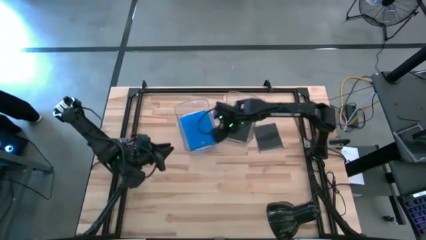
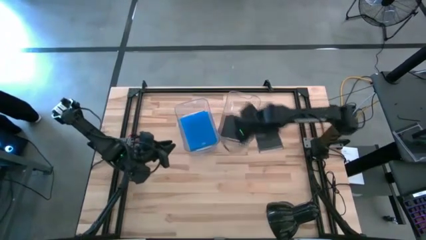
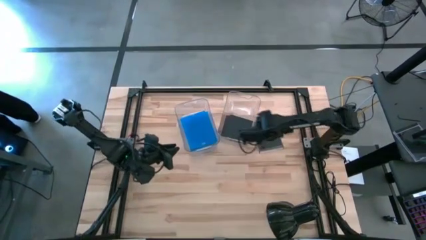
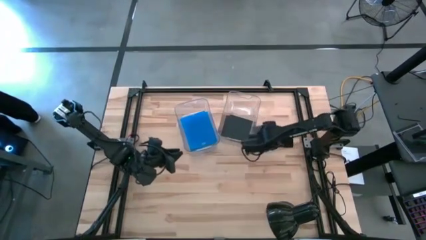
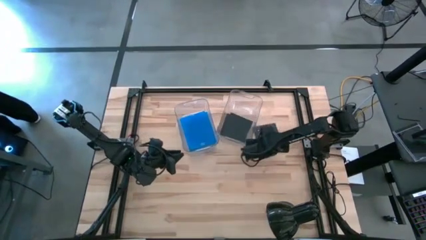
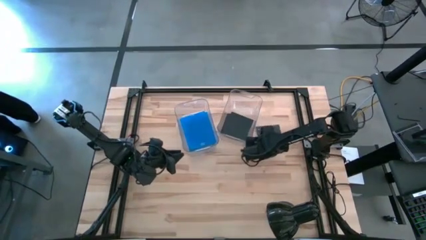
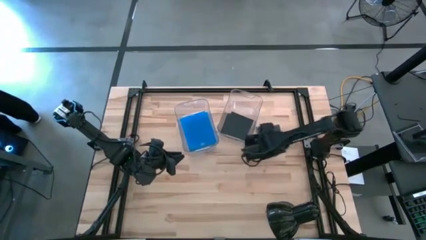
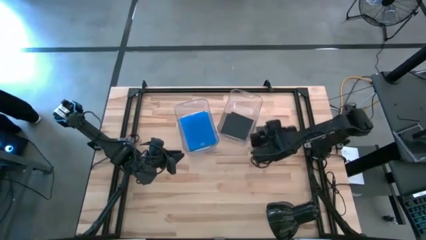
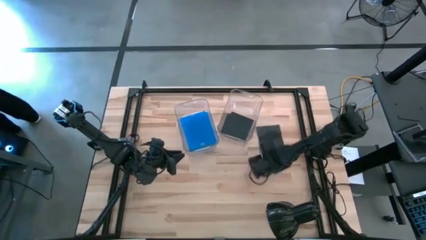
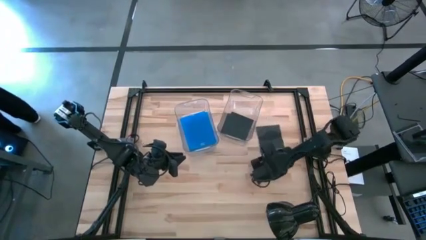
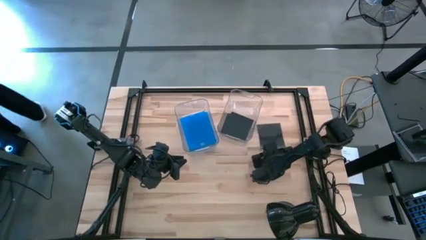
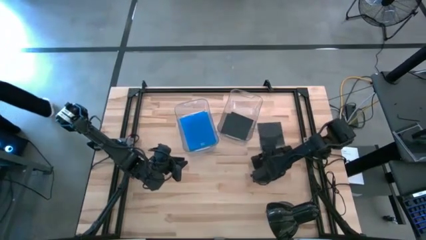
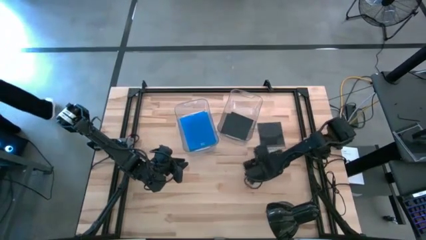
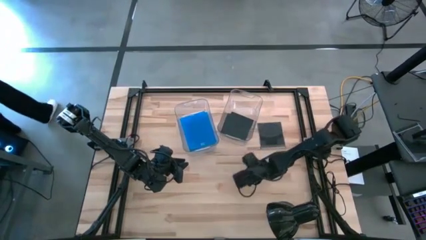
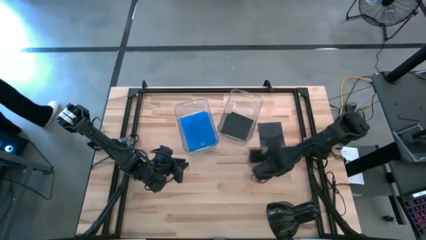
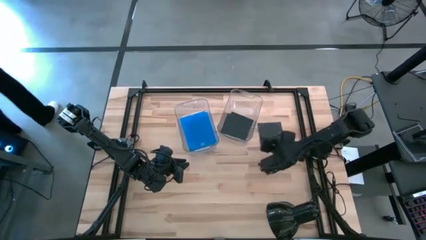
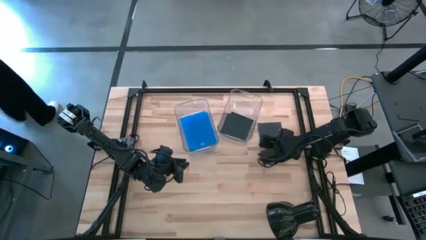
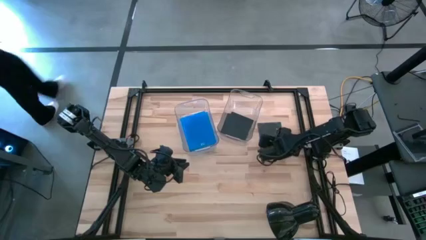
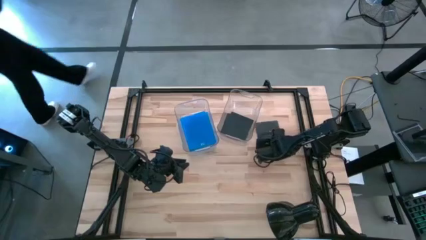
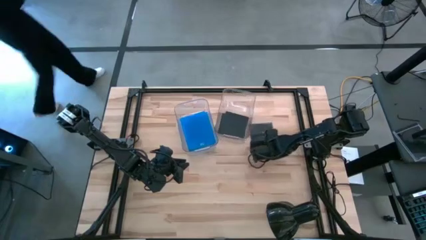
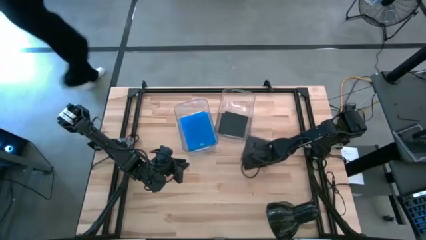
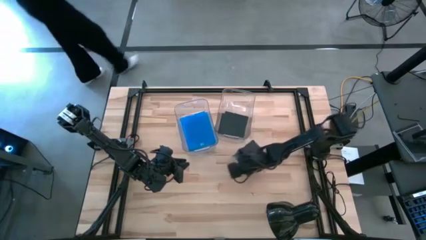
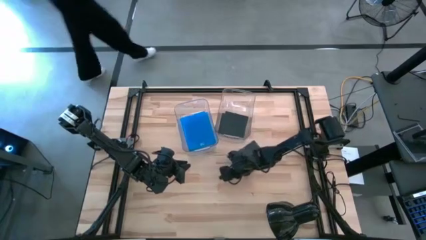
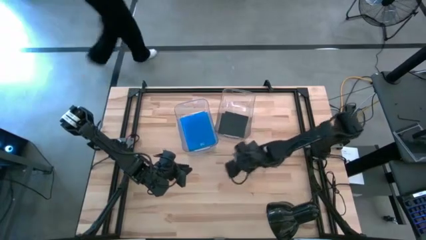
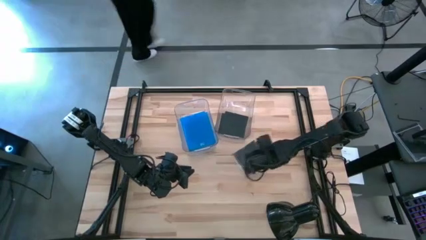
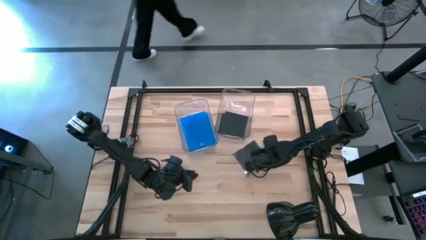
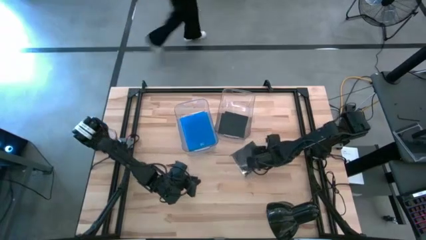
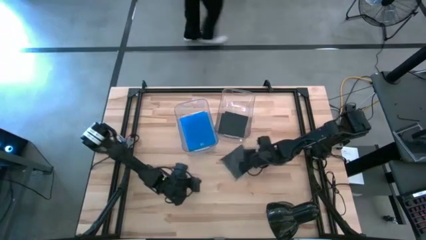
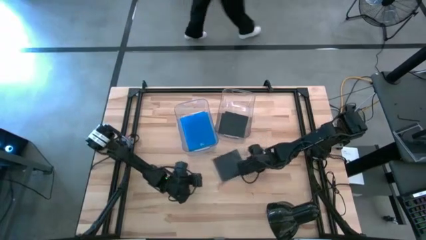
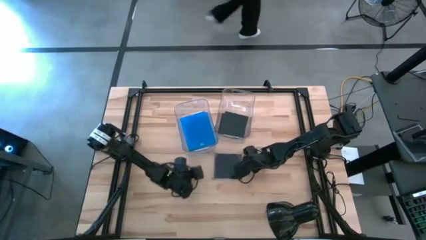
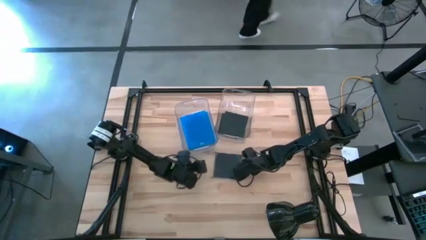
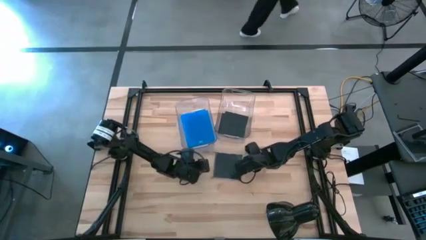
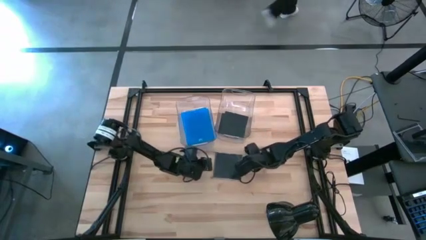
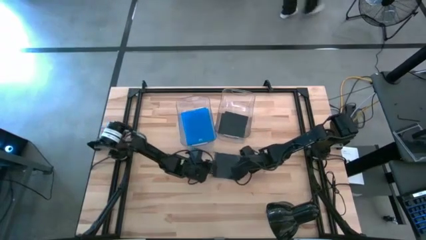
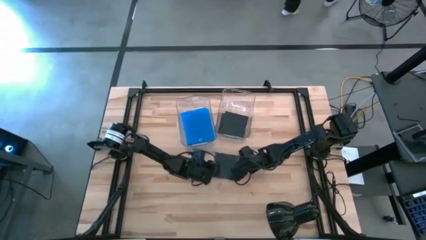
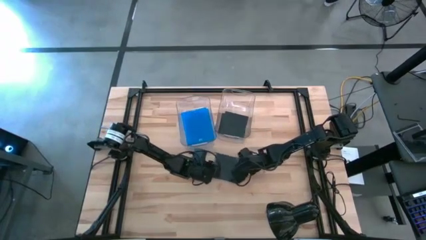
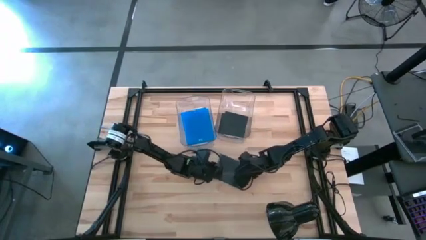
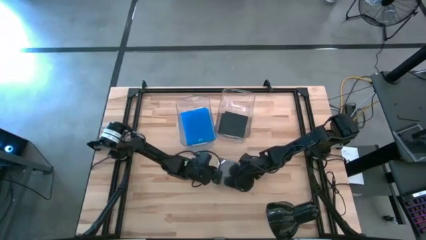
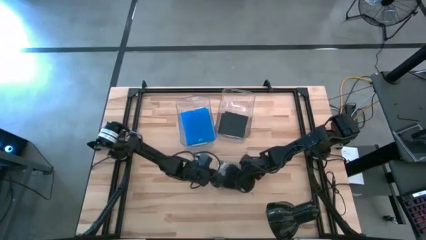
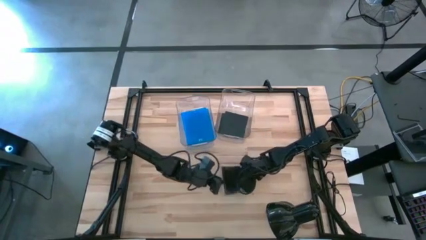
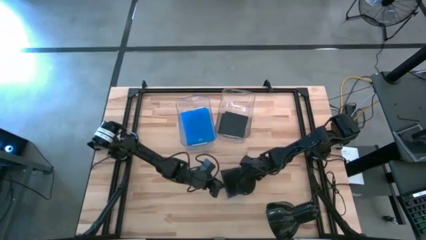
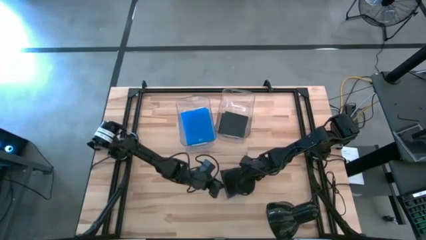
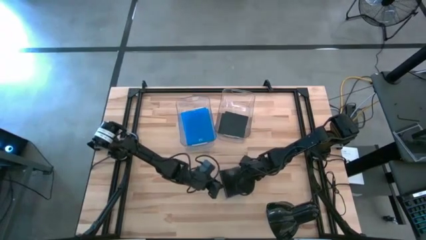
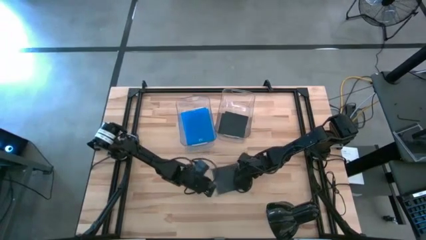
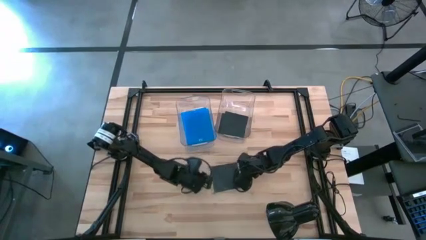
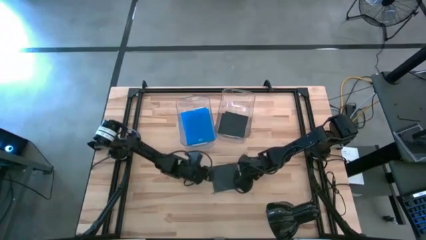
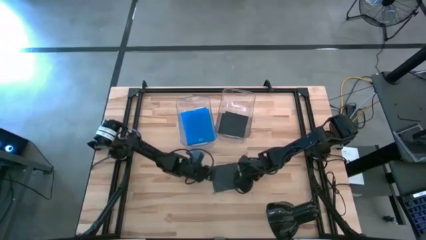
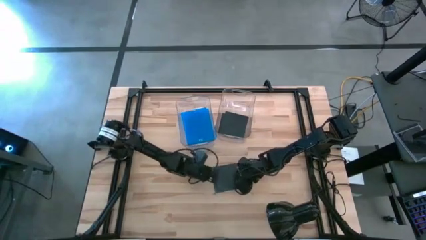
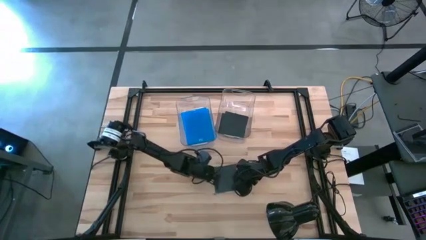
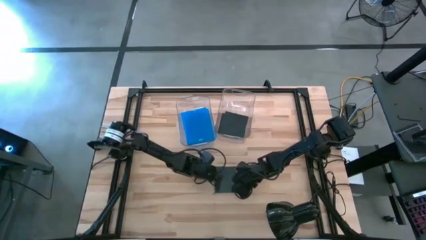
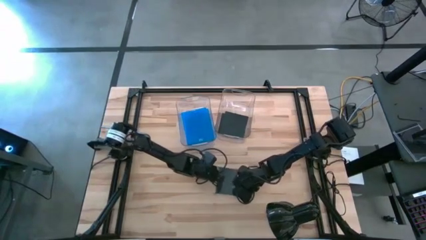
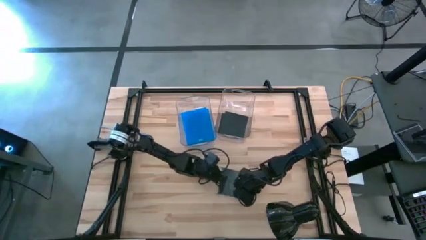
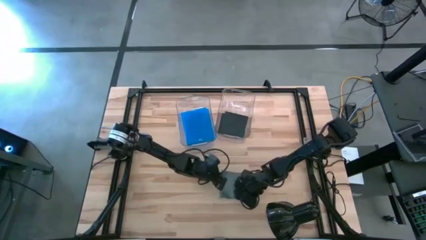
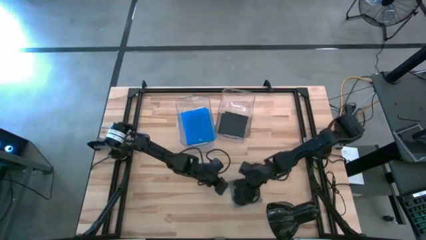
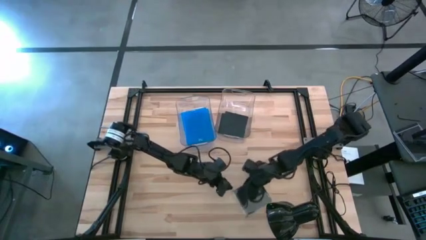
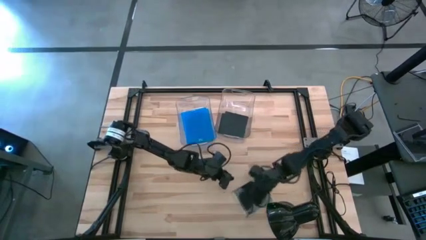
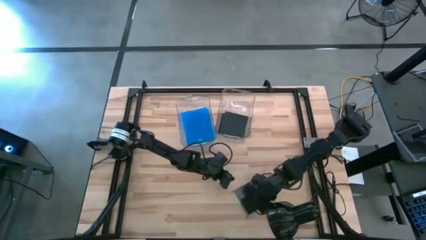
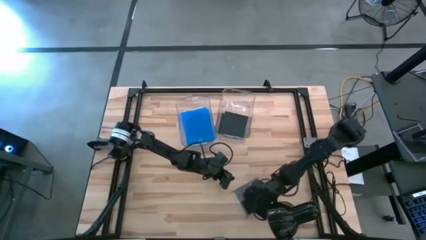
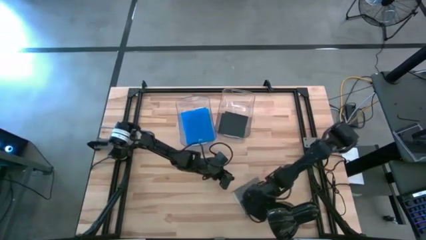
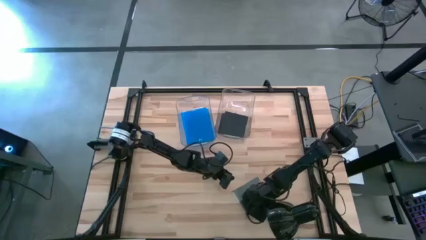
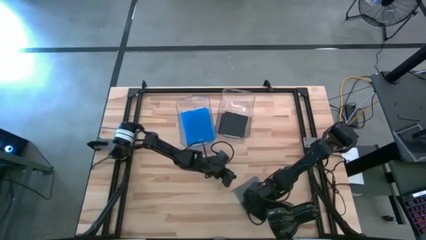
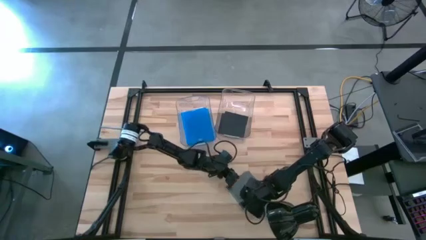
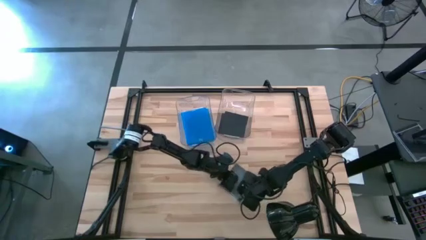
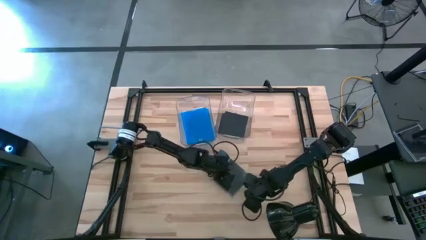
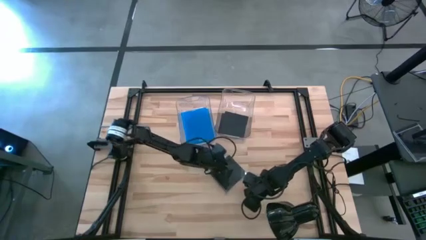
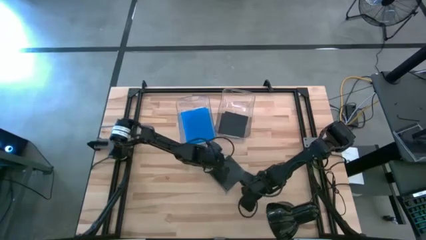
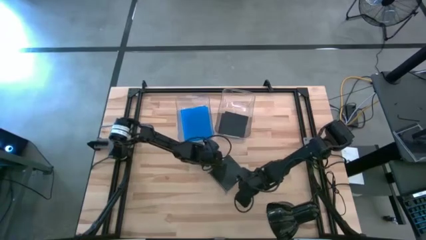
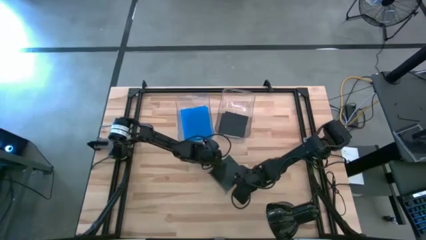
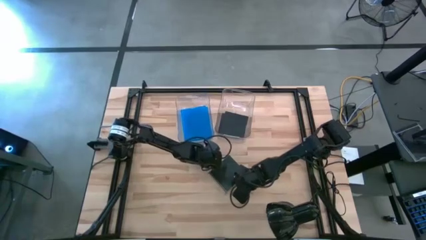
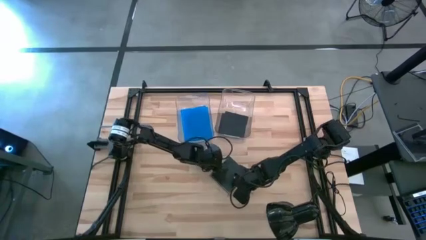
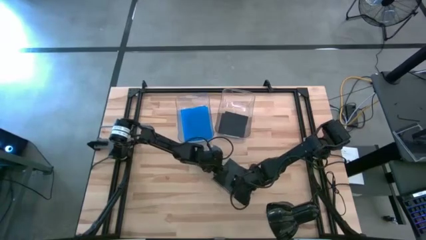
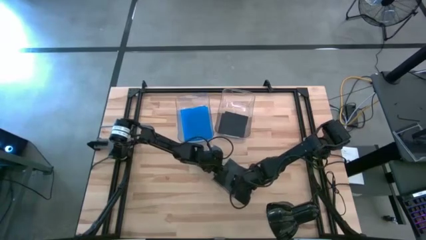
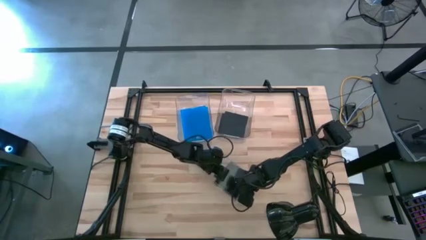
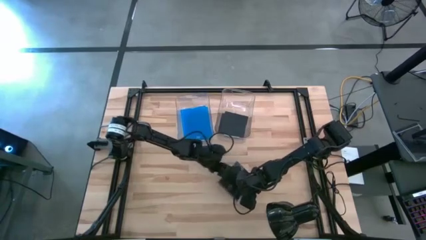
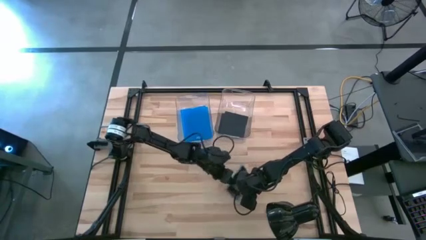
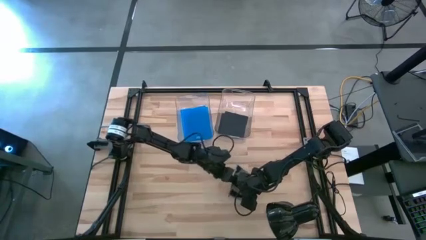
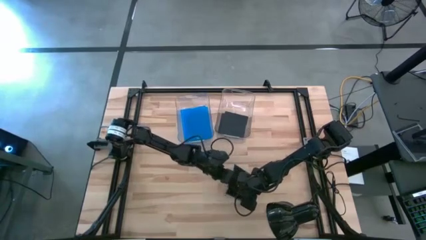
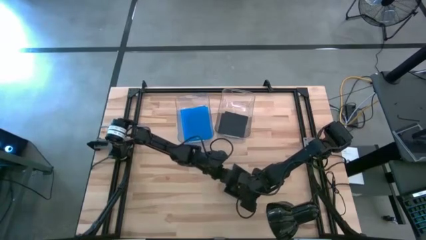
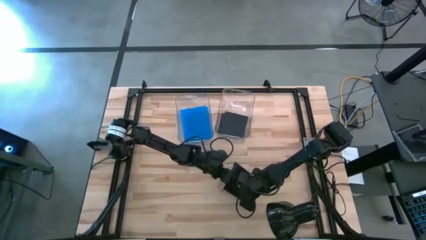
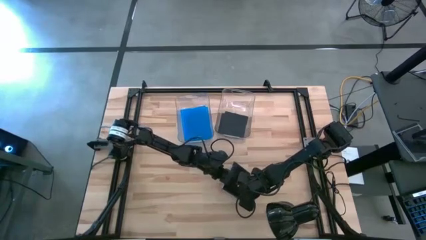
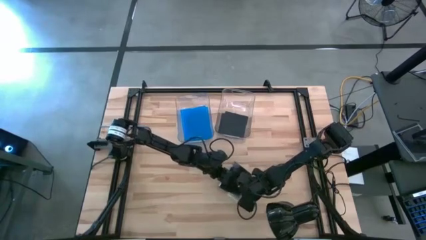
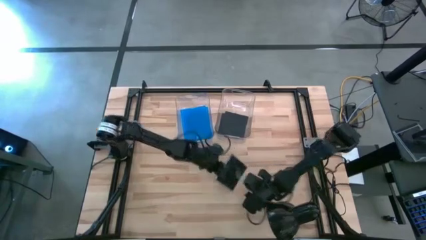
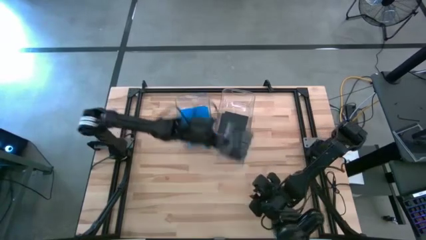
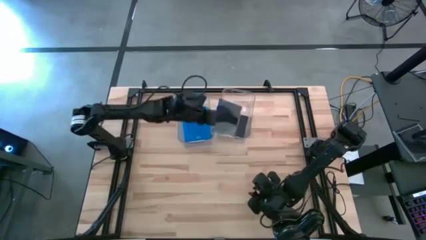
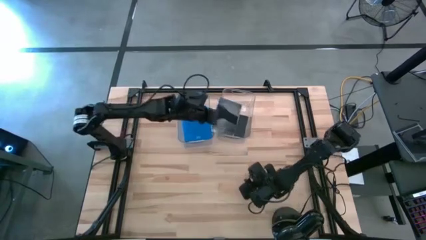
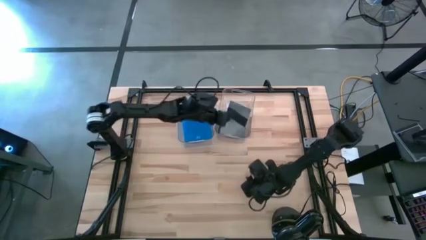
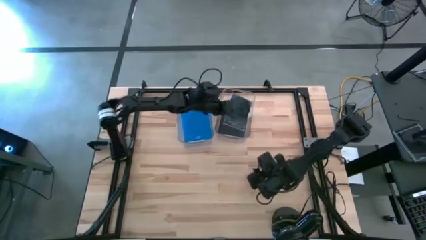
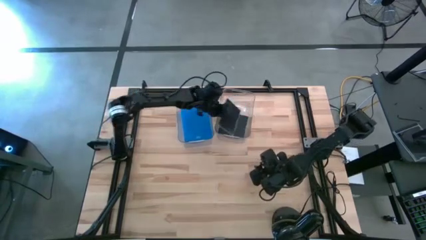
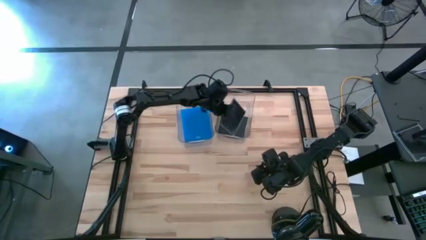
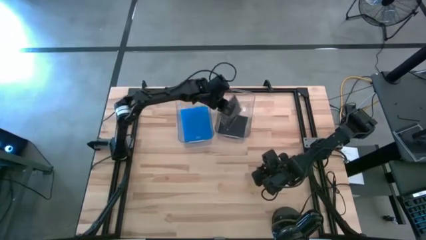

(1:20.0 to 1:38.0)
Task: Pick & place jewel cases by type
Put the black CD case into the right transparent bin

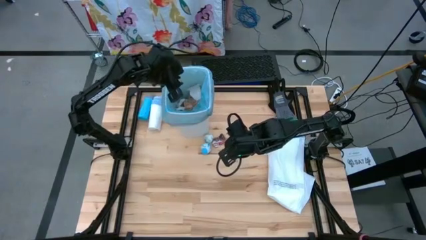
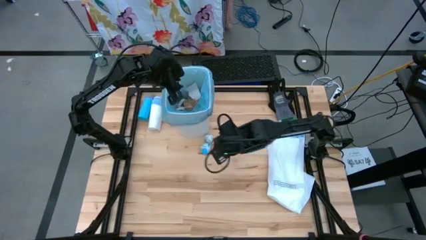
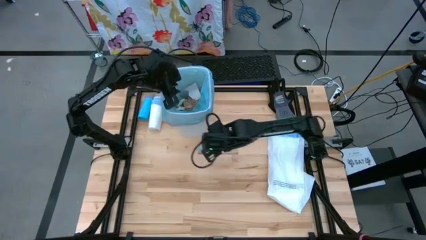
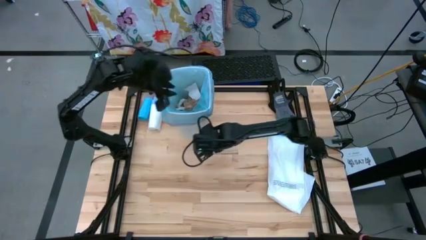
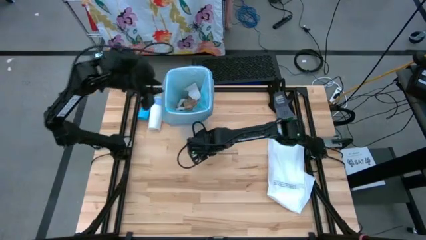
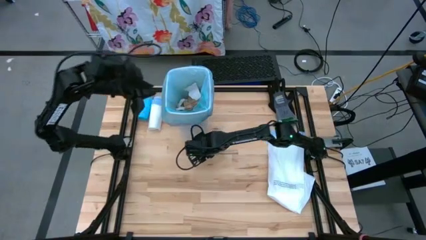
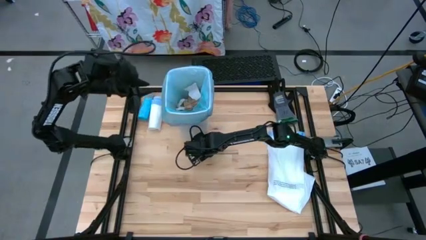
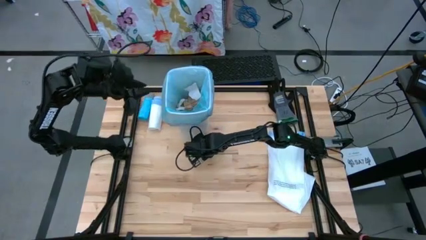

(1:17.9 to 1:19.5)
Task: place trash/remove bag and relplace
Put the blue trash bag into the white trash bin
